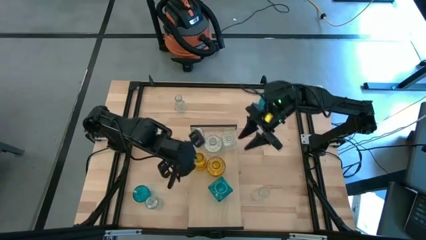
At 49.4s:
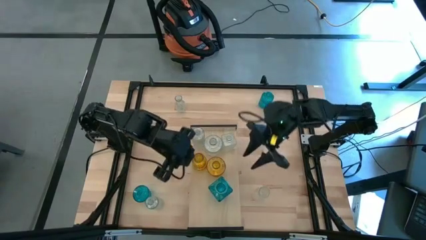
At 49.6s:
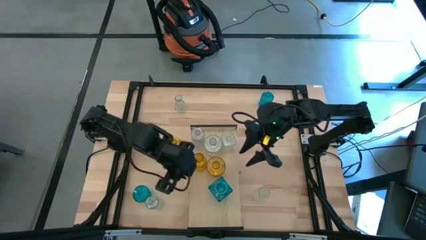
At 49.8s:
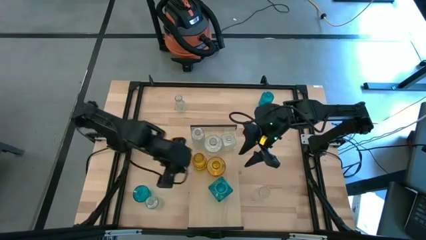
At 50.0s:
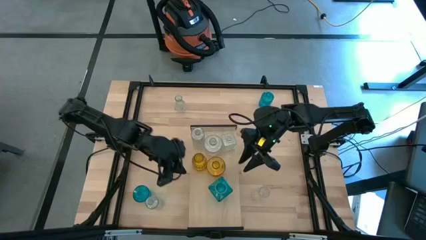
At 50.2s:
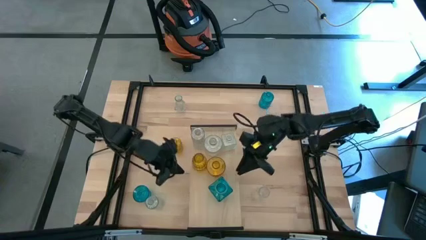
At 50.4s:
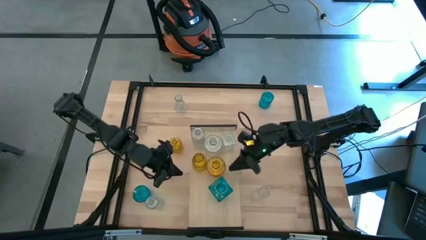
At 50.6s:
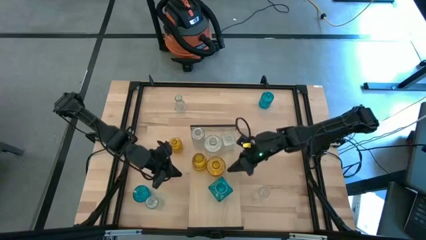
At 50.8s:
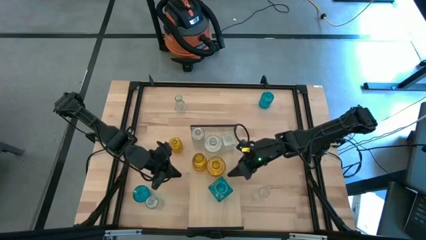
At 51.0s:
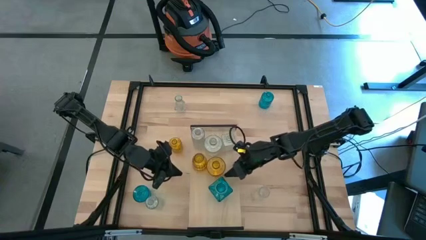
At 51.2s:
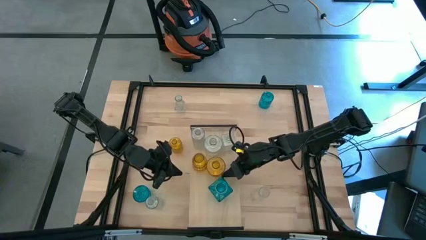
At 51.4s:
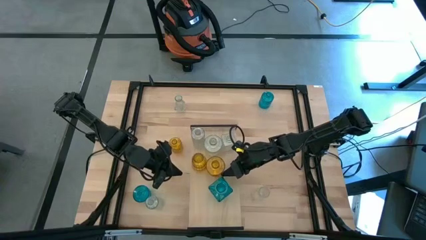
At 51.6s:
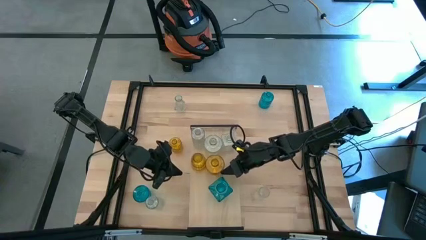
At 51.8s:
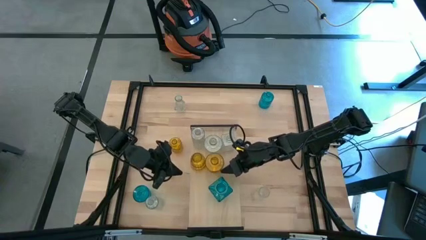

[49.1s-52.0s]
Task: sort vases onto shelf
Adjust the yellow vase on the shelf

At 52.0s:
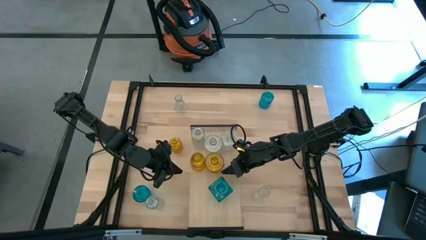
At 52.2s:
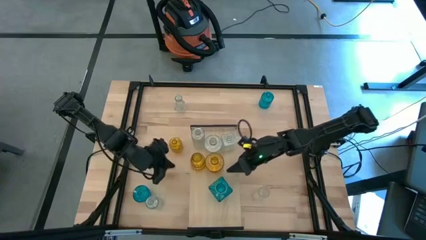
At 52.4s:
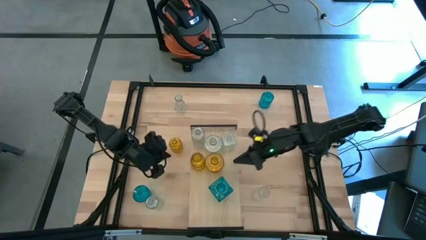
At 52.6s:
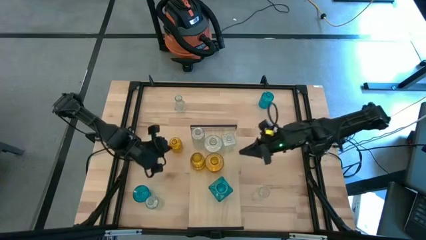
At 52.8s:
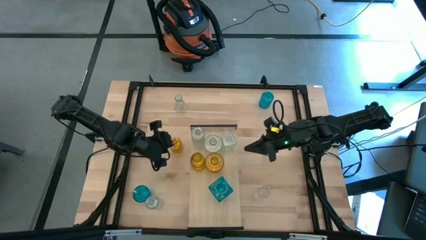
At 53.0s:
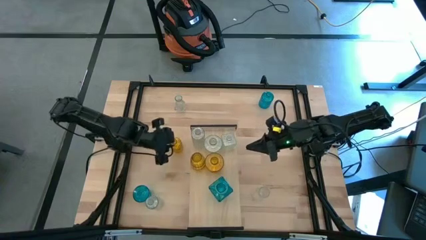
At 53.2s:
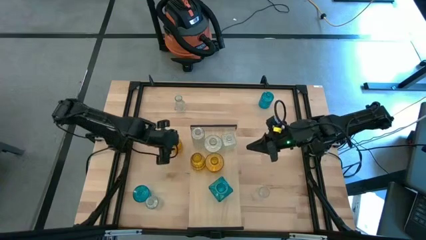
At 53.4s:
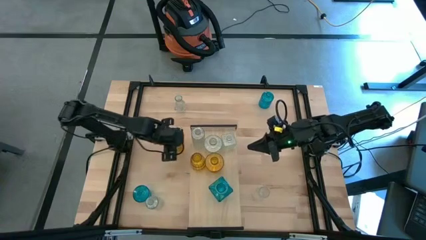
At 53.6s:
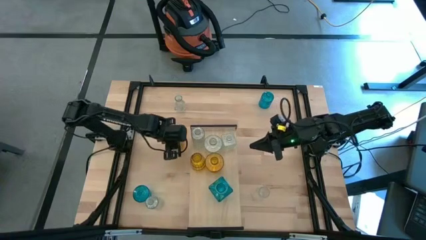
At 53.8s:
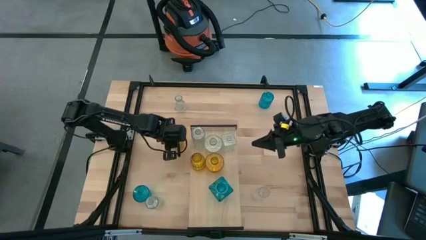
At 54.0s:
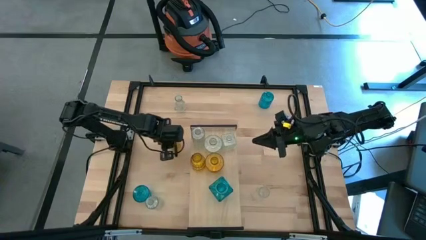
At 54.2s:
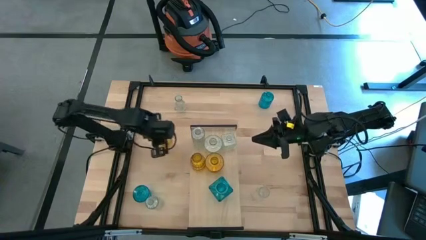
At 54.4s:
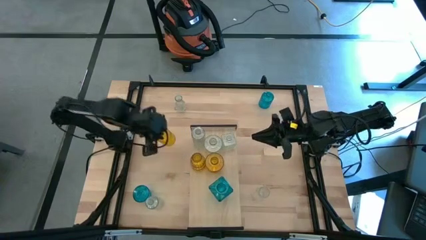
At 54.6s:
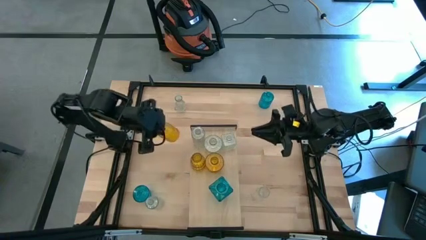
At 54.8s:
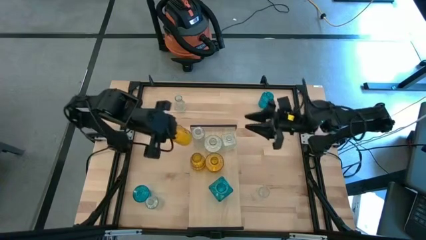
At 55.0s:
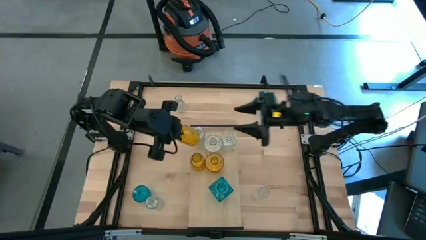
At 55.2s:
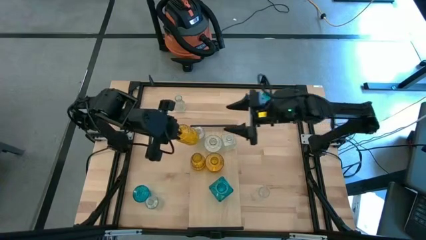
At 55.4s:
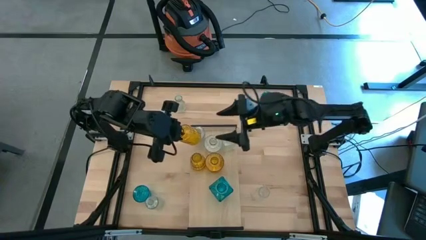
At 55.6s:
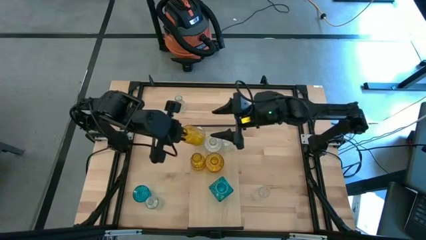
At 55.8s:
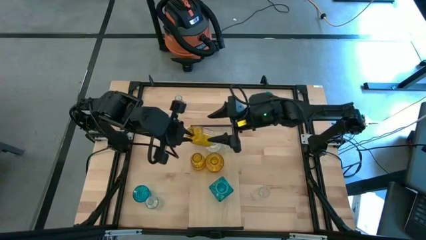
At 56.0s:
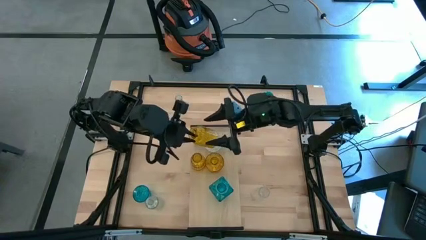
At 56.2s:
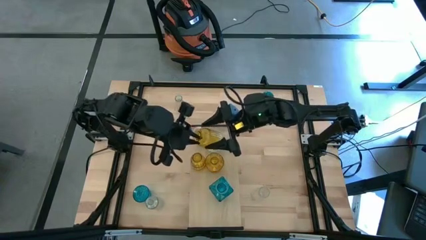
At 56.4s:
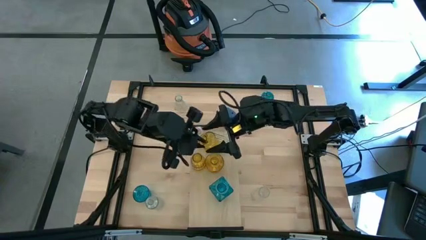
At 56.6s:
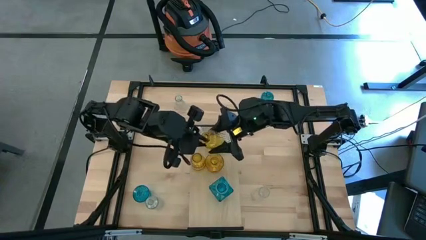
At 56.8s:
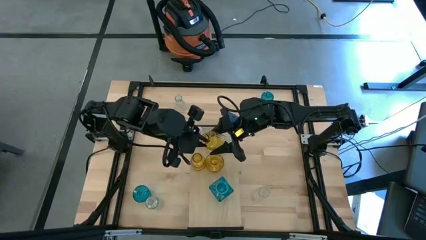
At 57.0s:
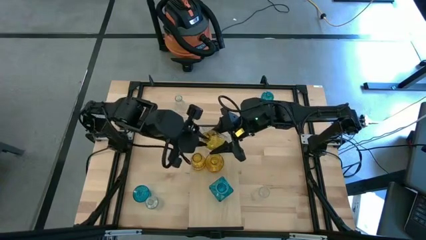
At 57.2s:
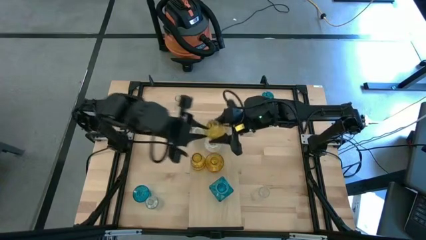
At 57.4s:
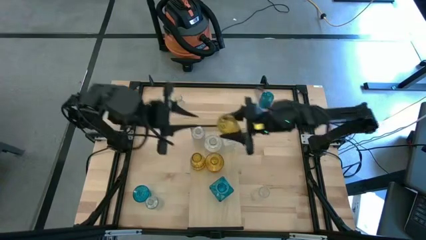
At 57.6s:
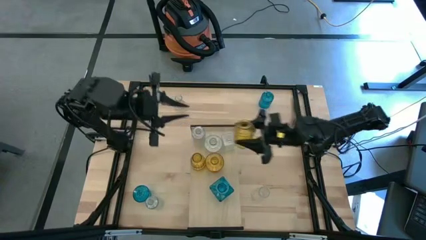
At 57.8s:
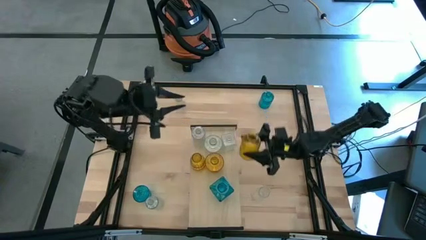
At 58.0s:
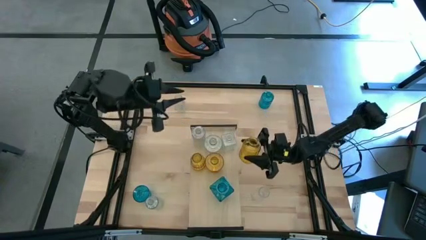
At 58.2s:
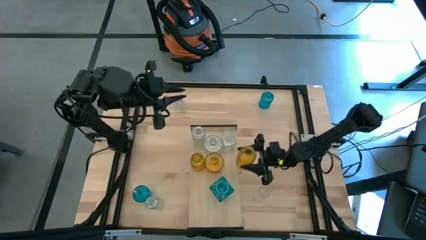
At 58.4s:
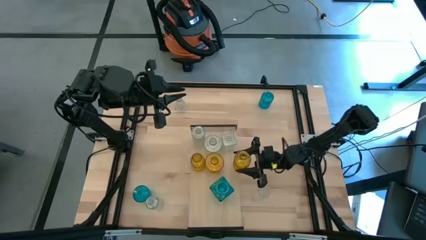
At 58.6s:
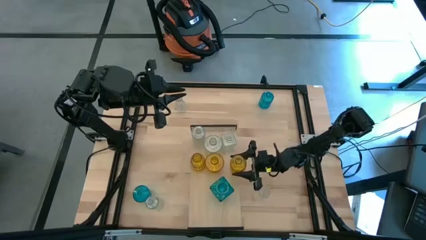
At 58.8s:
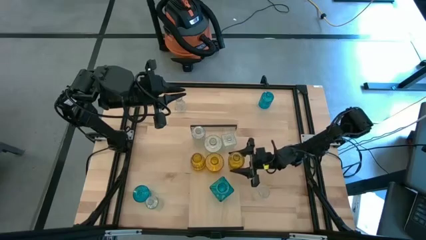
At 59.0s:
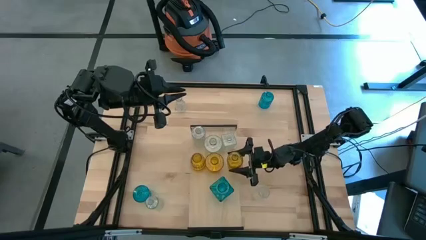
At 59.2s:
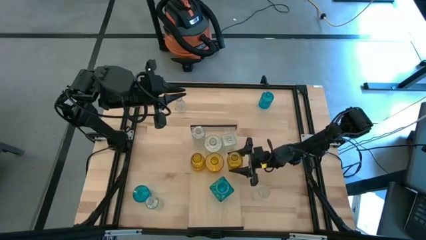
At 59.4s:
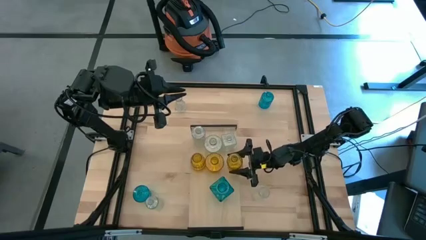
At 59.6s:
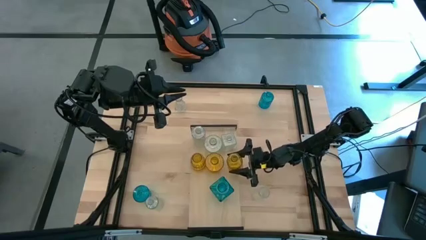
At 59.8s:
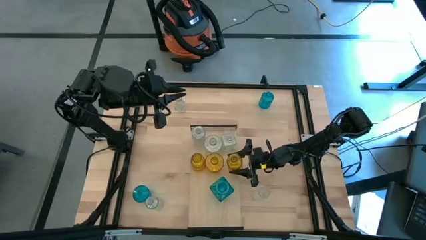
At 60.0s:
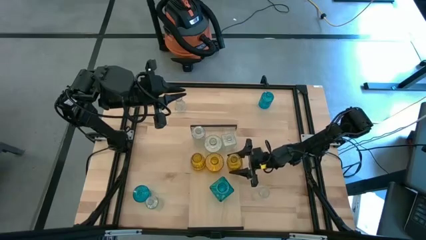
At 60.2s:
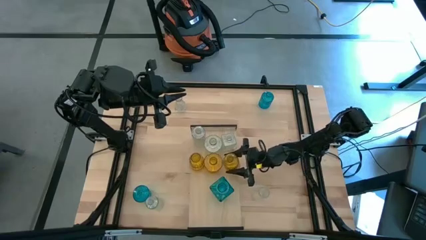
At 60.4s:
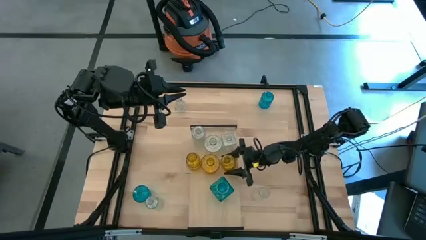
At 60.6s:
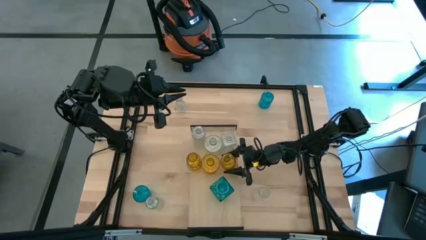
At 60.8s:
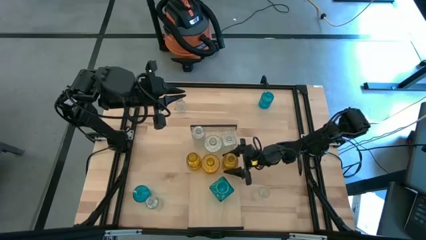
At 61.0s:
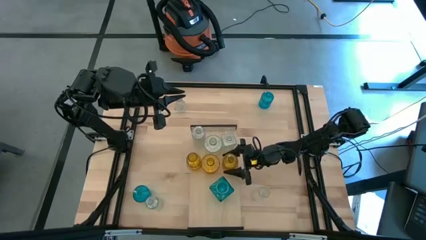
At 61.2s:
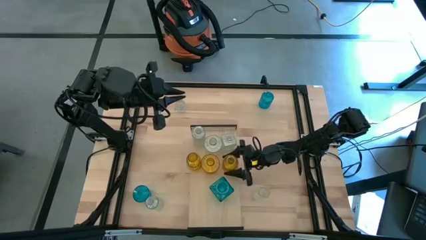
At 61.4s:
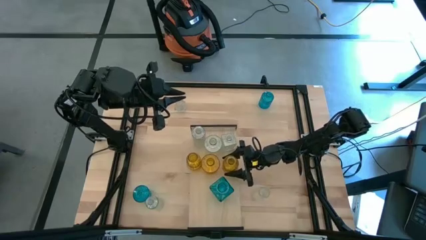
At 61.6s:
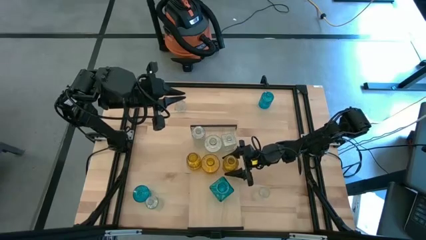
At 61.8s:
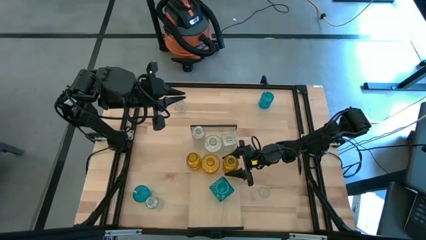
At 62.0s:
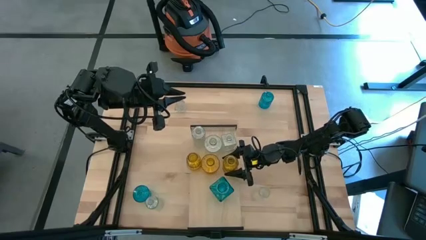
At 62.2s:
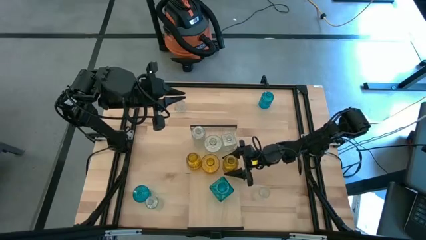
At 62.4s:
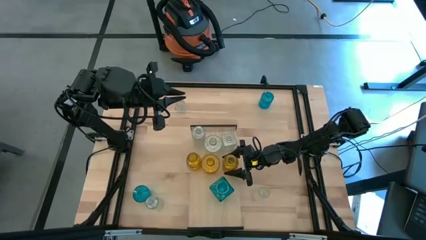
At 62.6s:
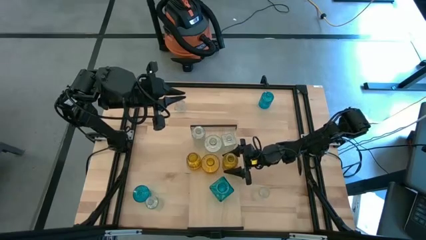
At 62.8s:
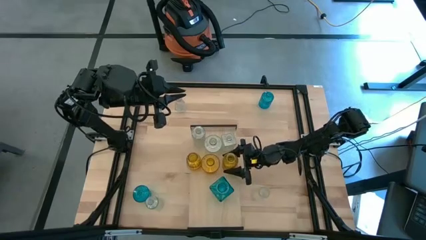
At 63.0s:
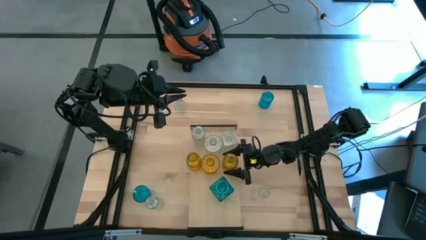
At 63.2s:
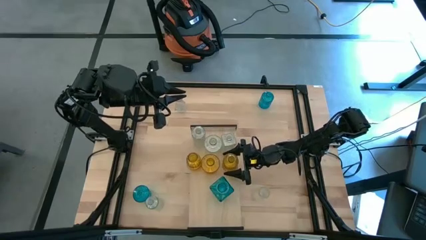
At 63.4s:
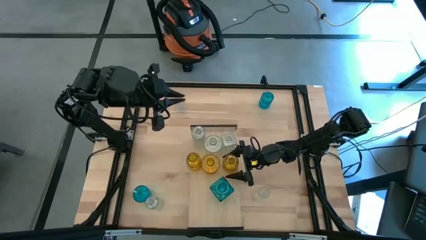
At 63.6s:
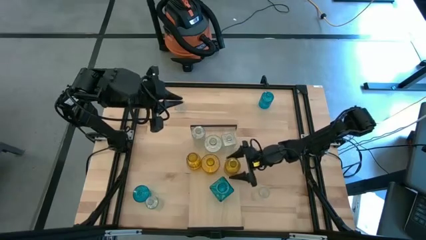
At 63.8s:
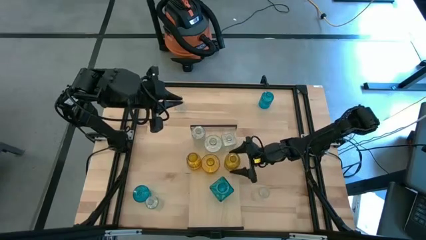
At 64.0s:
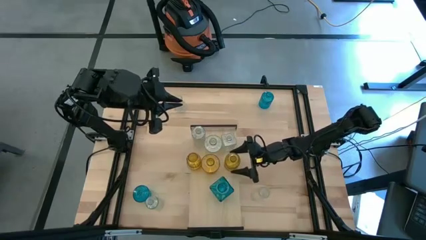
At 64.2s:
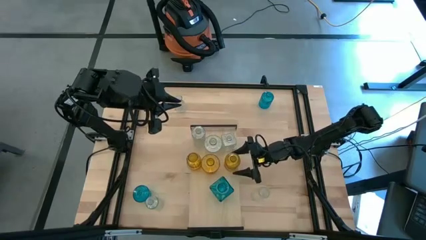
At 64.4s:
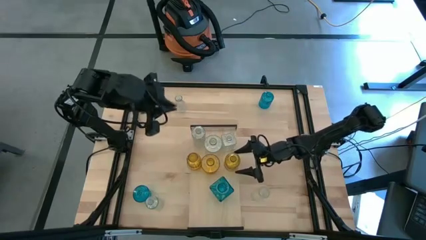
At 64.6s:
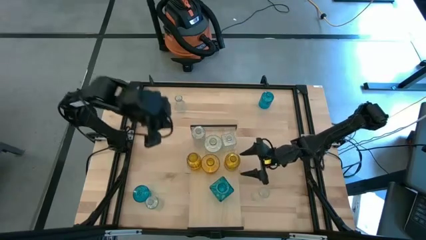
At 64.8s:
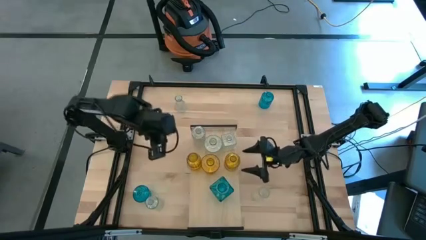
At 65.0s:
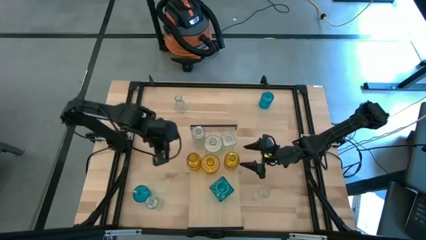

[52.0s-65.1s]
Put the yellow vase on the shelf align with the other yellow vases

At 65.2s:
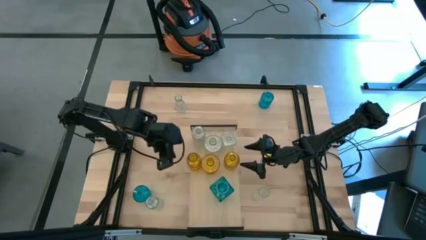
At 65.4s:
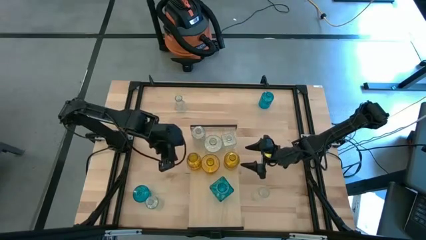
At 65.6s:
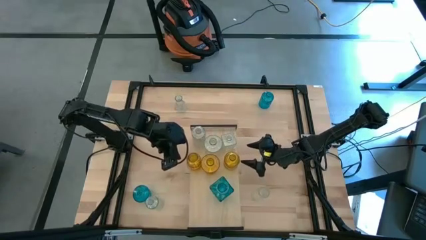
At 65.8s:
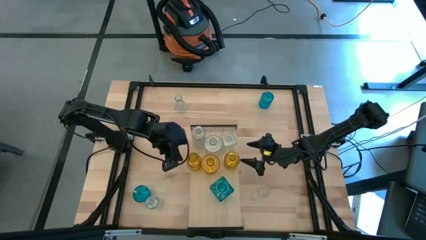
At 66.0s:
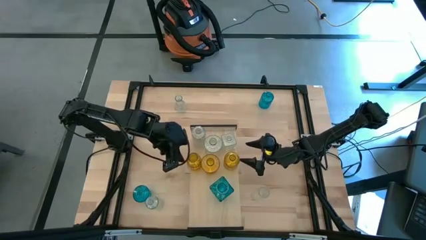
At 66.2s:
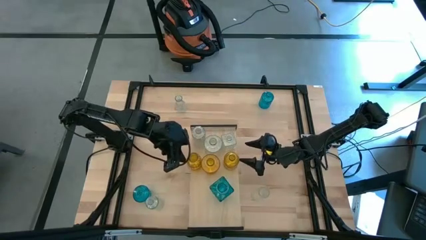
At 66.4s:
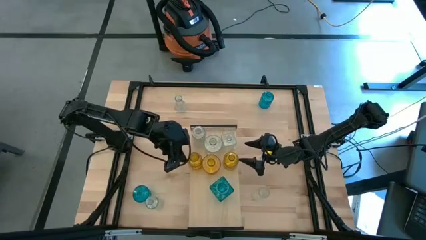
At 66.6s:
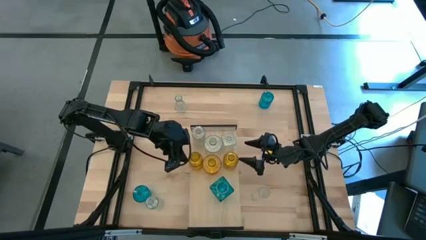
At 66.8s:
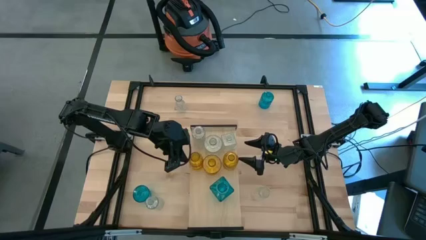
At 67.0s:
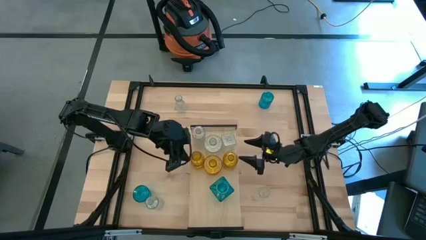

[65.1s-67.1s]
Adjust the yellow vases on the shelf
